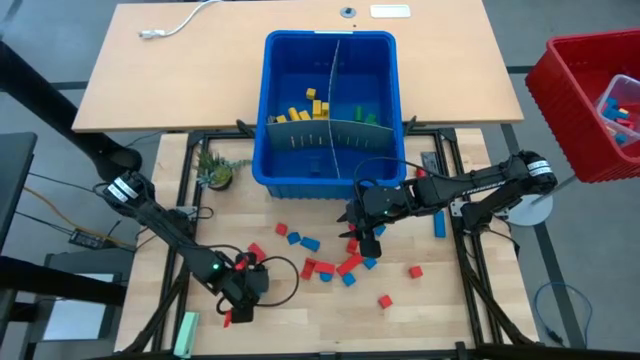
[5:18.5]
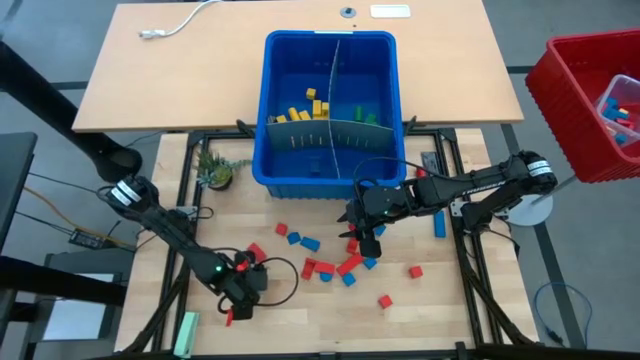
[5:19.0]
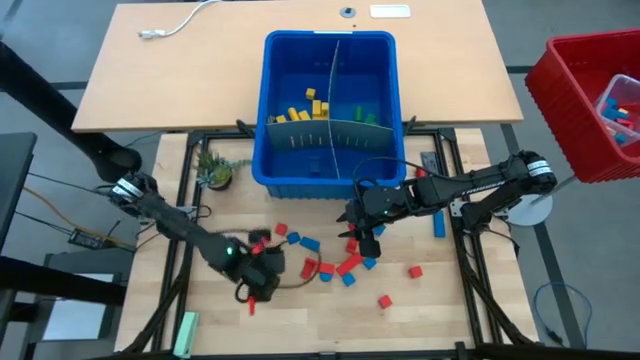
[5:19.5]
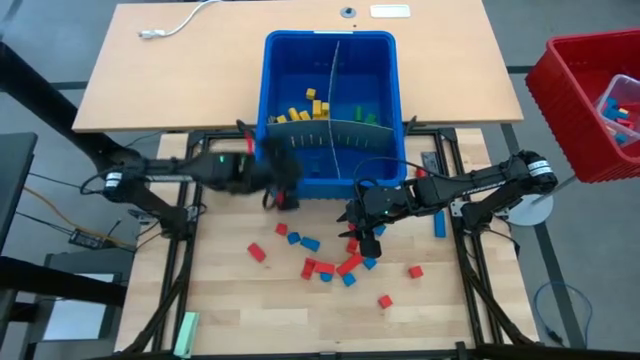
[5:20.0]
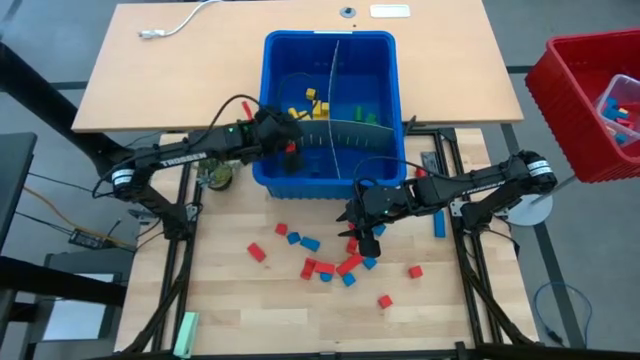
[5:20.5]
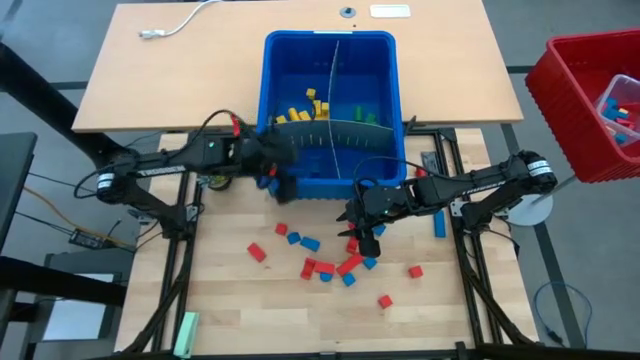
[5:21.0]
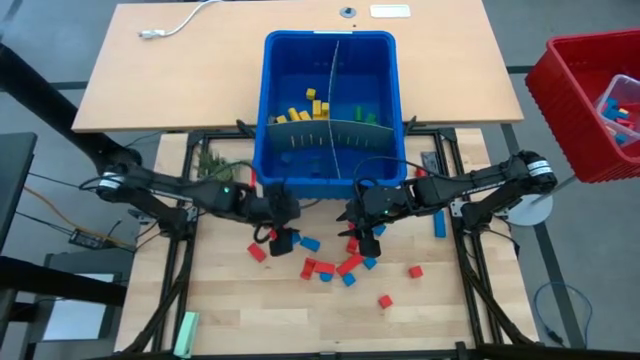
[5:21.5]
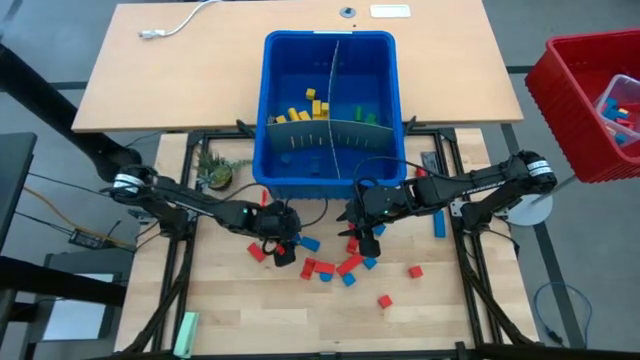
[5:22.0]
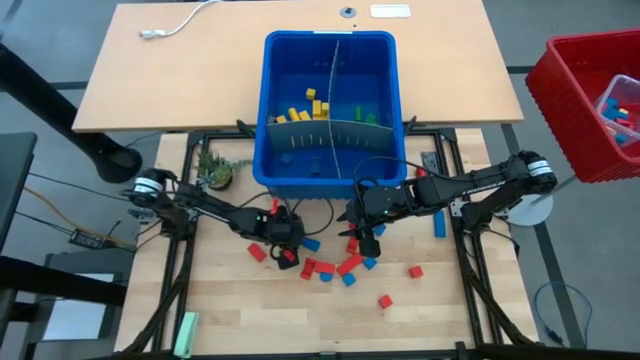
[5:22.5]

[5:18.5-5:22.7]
Task: Sort blocks
Put the blue block with the other blue blocks into the blue bin

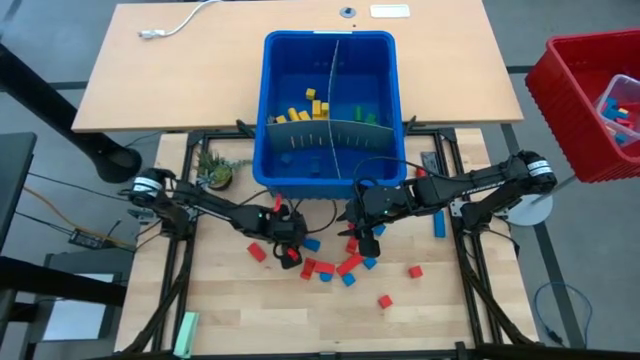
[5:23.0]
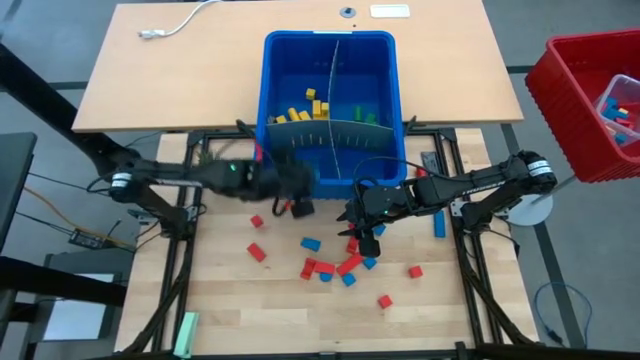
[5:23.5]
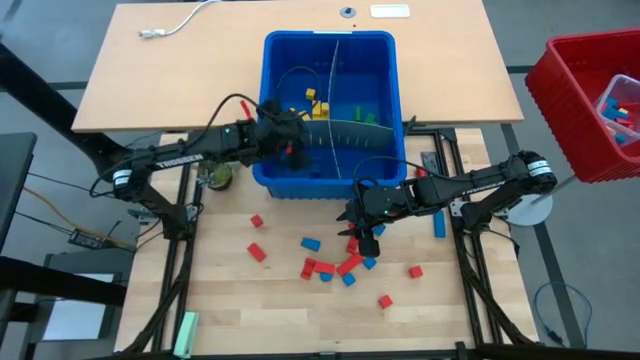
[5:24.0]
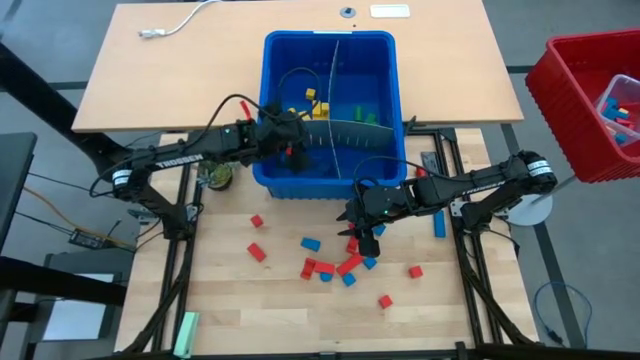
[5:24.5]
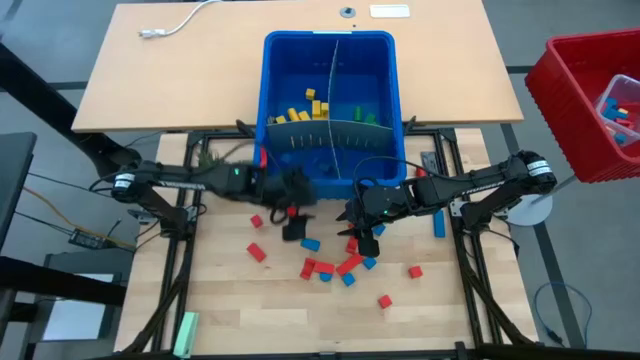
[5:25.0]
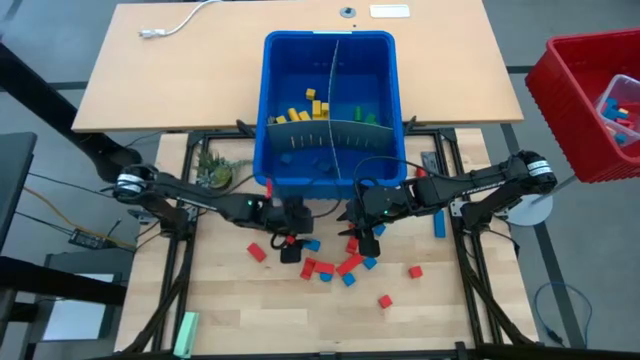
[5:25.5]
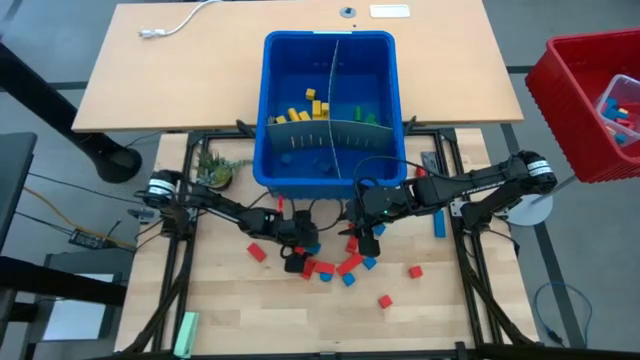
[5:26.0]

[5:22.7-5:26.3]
Put the blue block with the other blue blocks into the blue bin

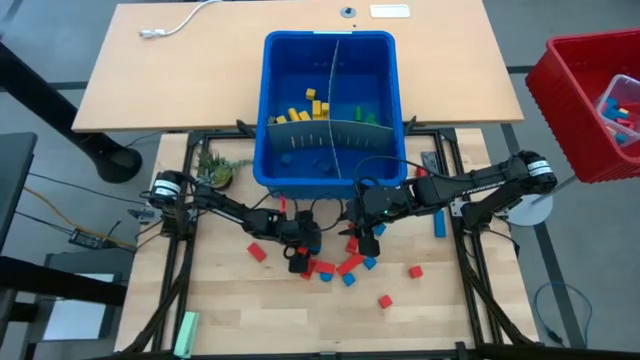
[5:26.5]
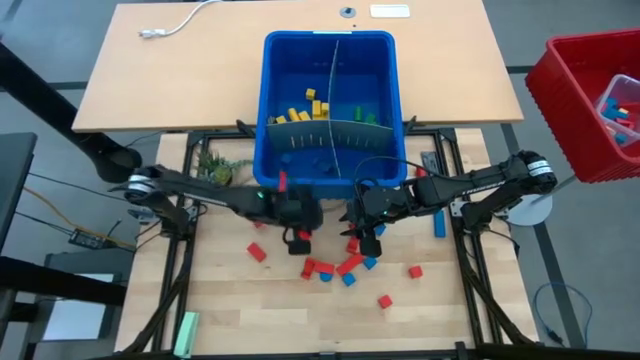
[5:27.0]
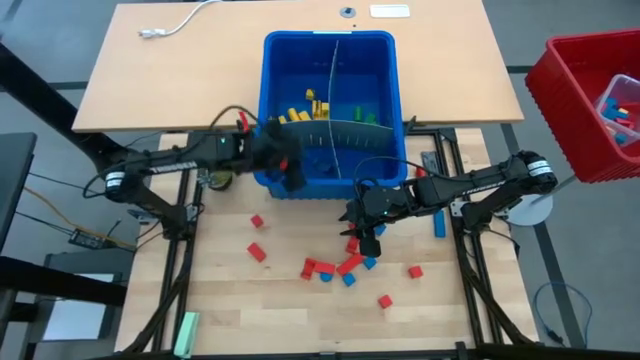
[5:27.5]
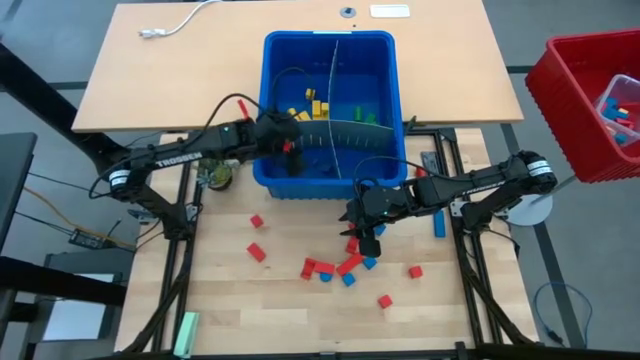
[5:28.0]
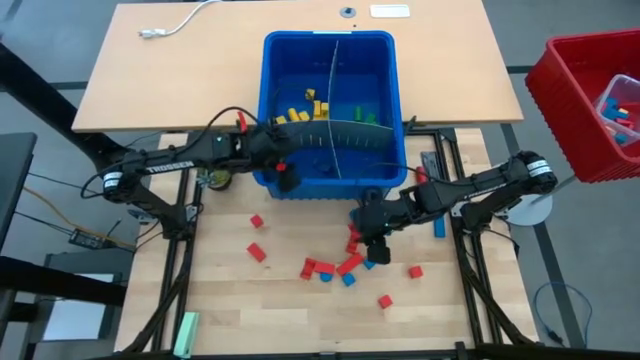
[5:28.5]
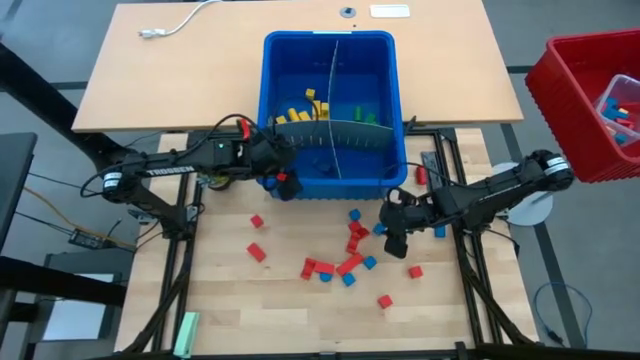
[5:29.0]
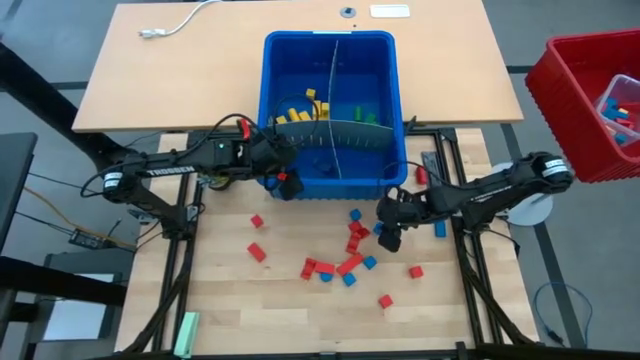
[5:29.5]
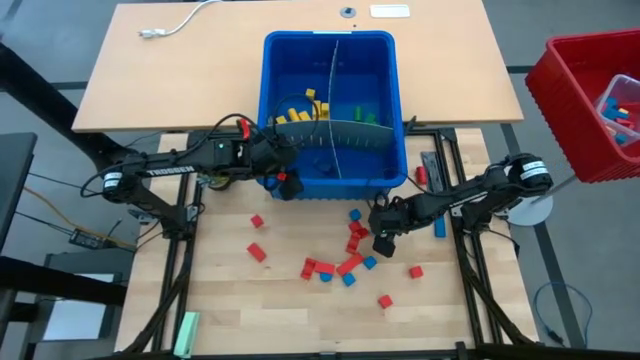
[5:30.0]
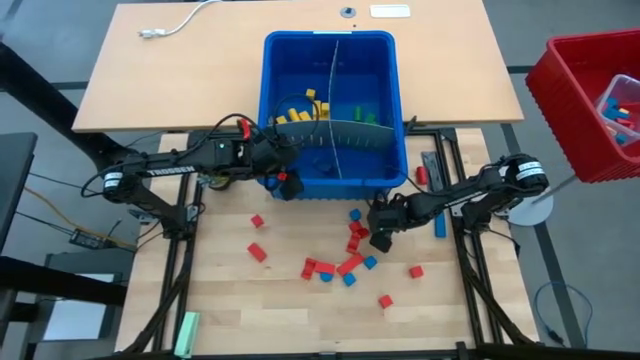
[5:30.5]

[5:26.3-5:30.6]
Put the blue block with the other blue blocks into the blue bin

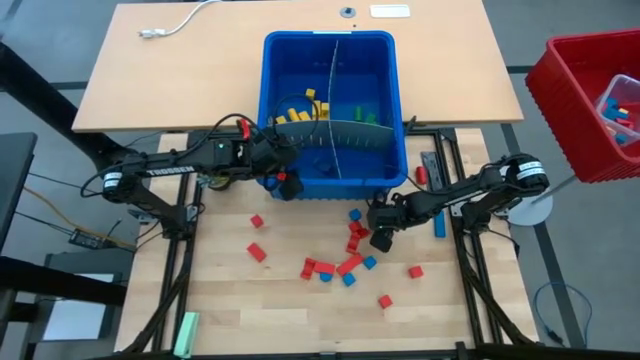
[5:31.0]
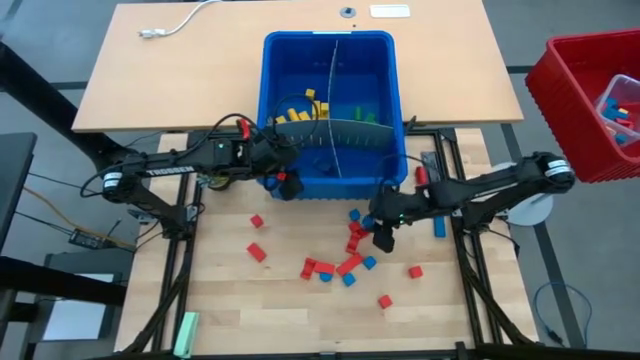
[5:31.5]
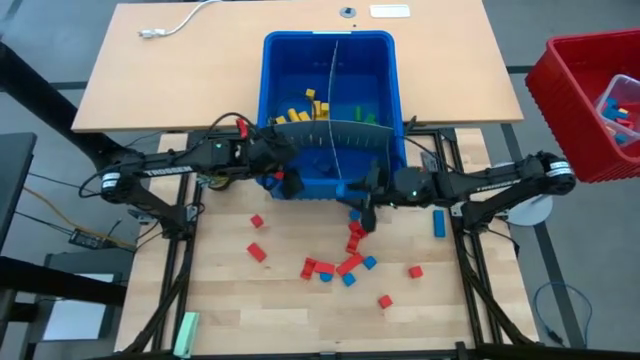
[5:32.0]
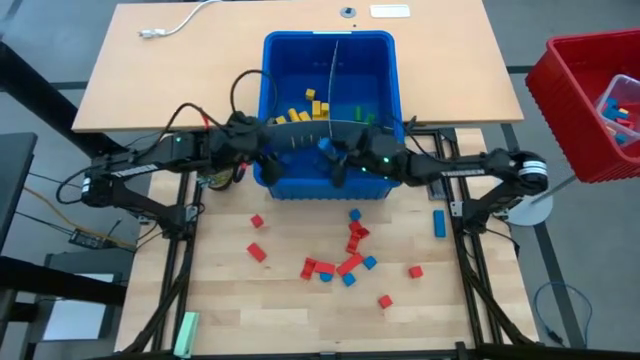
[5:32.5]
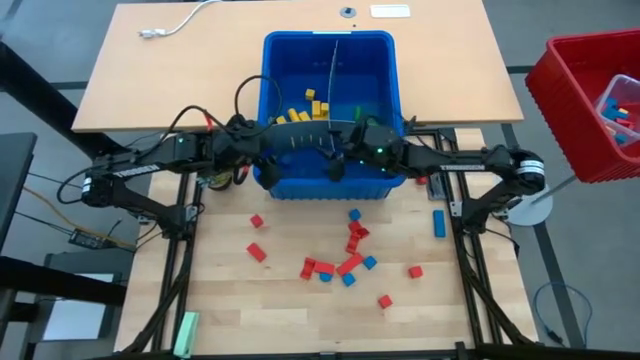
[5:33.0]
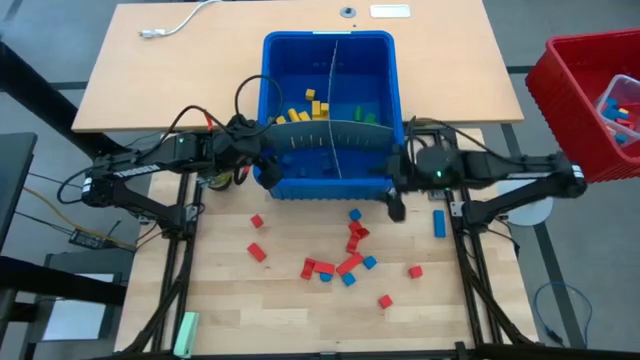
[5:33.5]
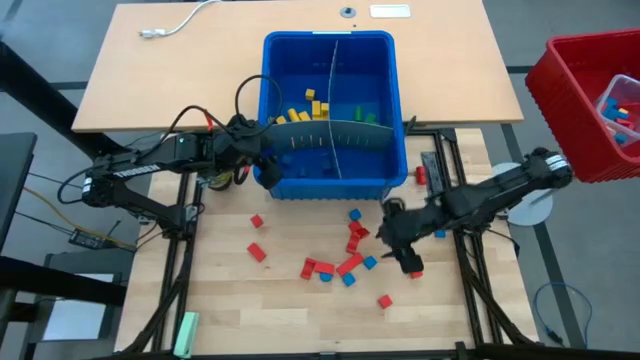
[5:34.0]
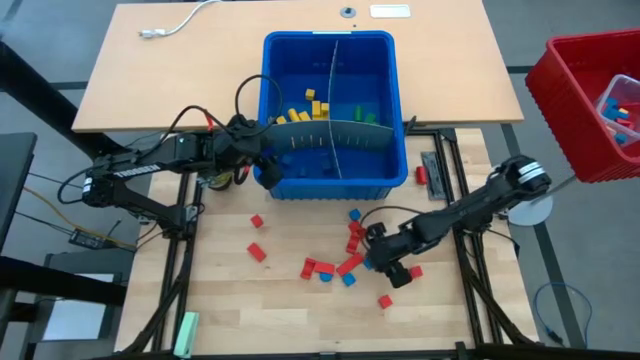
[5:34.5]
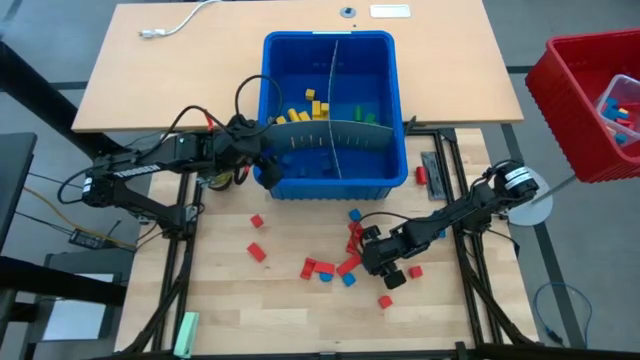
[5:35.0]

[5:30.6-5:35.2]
Put the blue block with the other blue blocks into the blue bin

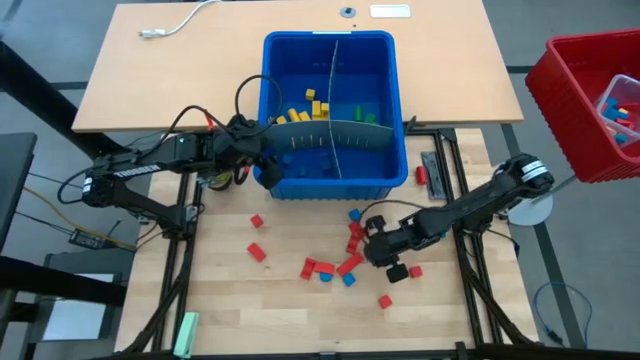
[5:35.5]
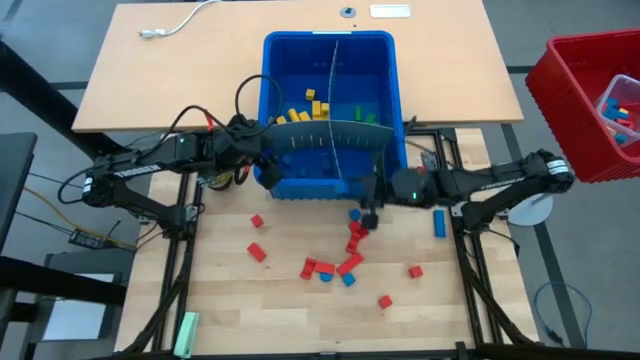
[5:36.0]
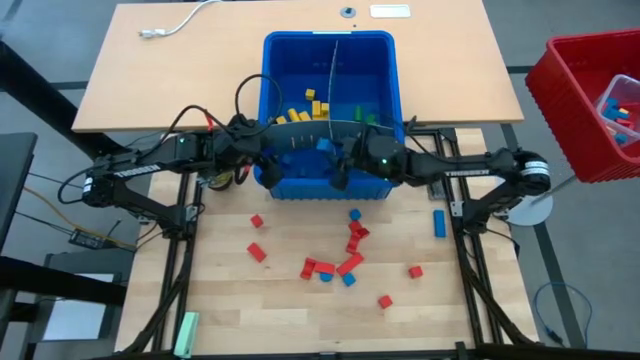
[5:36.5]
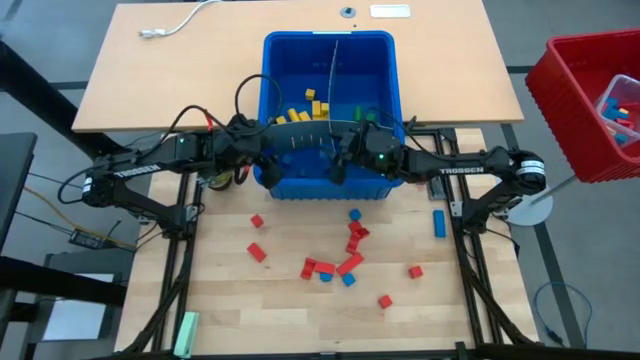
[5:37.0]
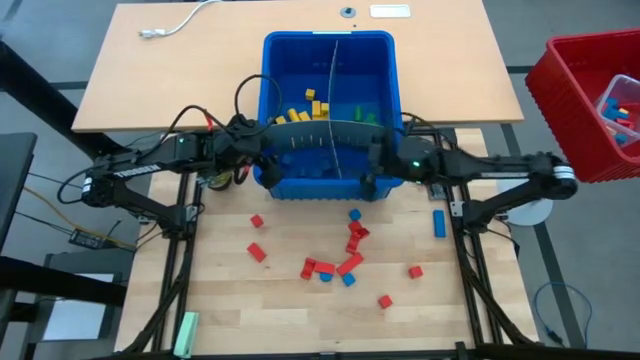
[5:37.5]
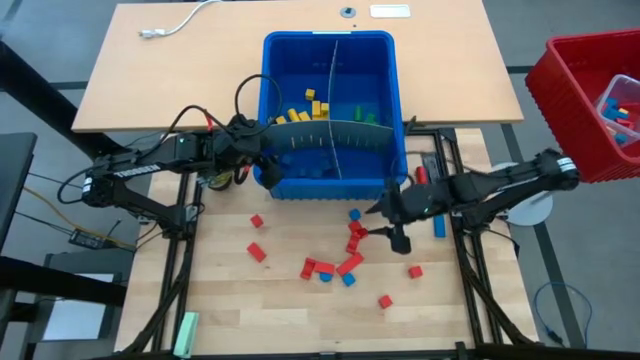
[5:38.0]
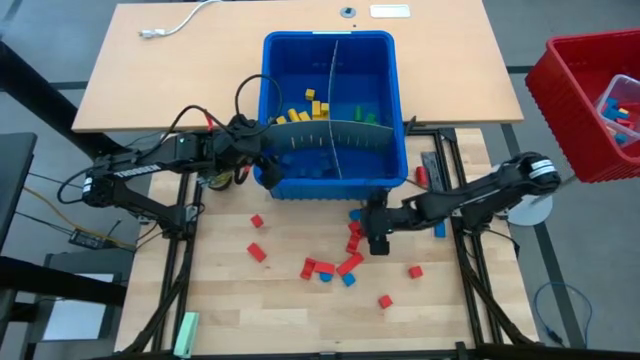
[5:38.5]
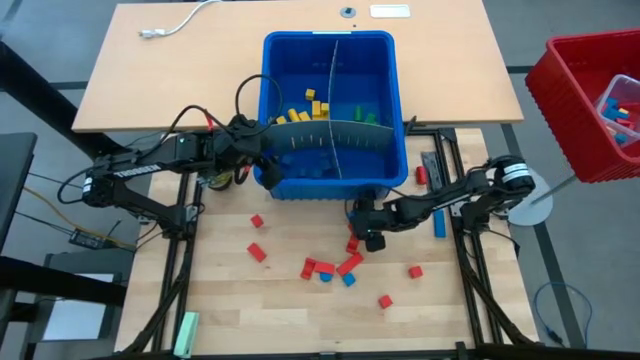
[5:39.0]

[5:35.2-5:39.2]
Put the blue block with the other blue blocks into the blue bin
